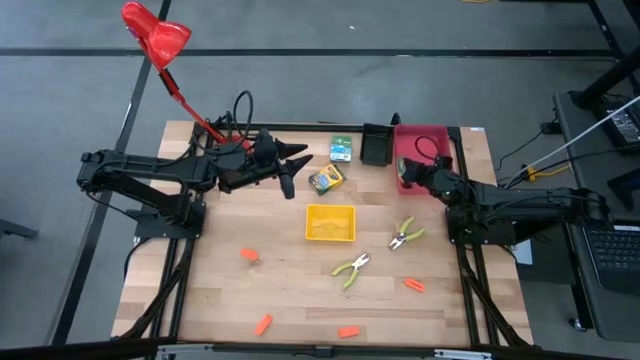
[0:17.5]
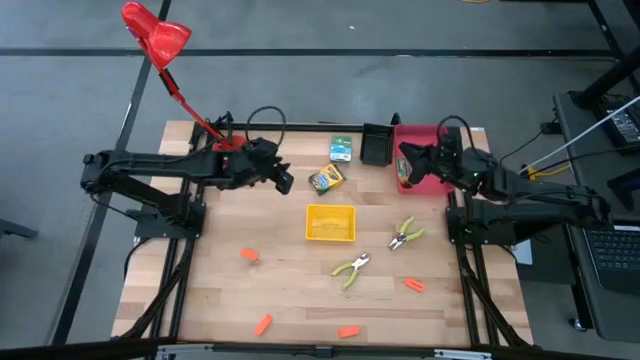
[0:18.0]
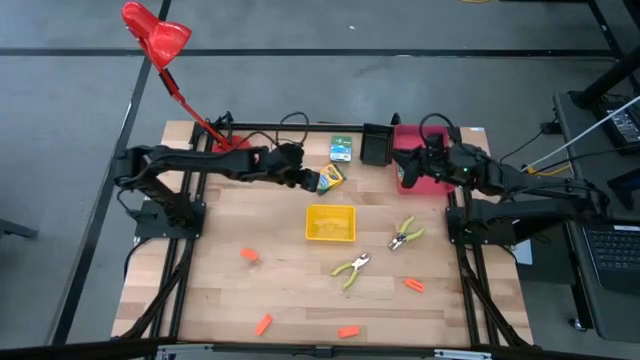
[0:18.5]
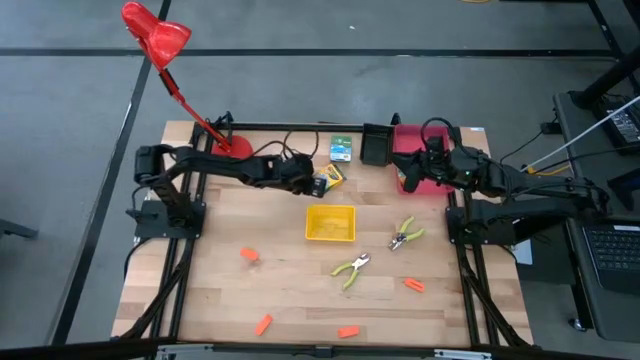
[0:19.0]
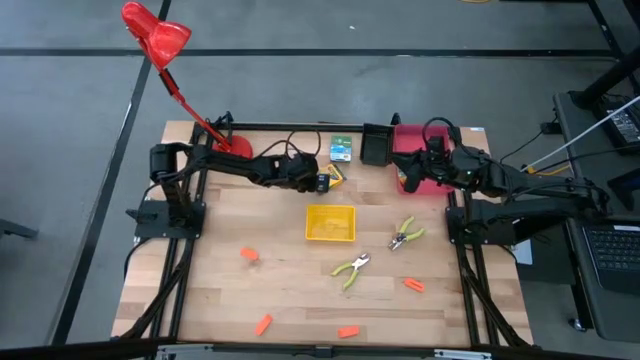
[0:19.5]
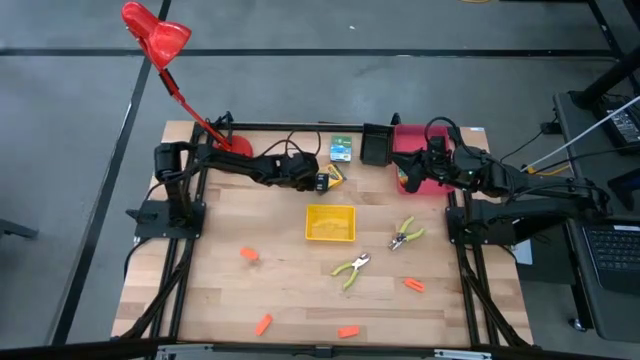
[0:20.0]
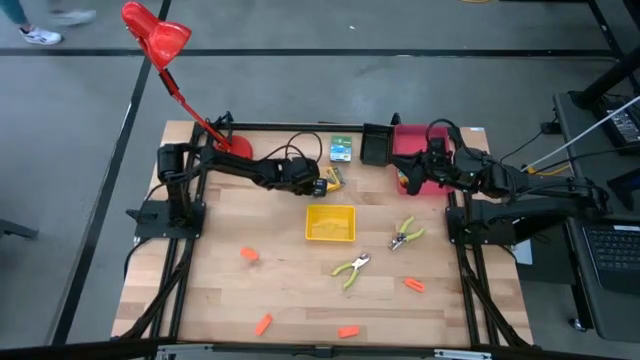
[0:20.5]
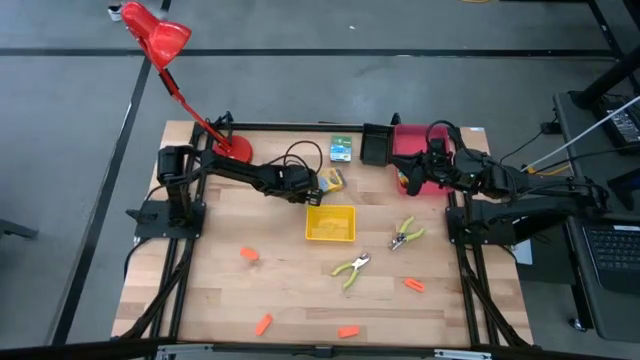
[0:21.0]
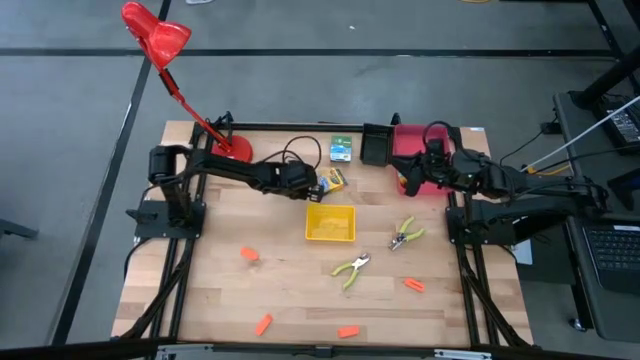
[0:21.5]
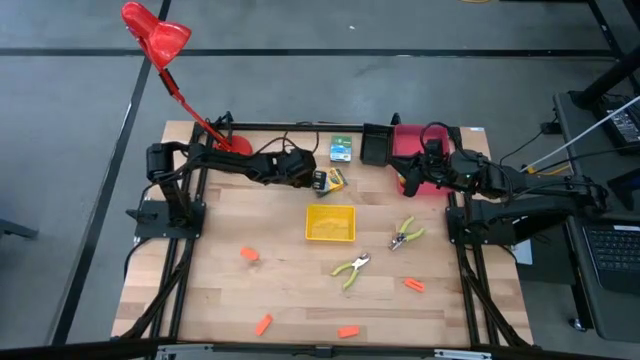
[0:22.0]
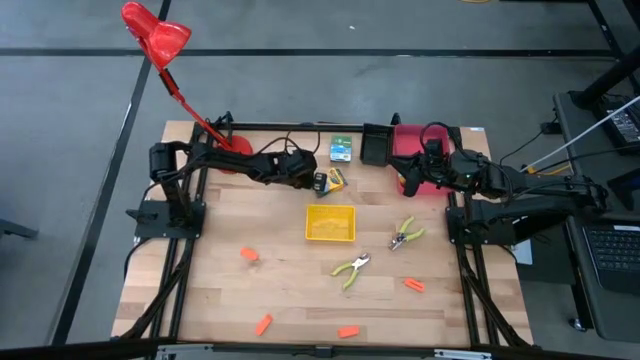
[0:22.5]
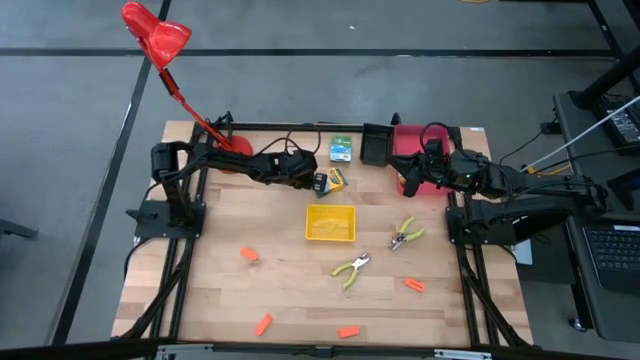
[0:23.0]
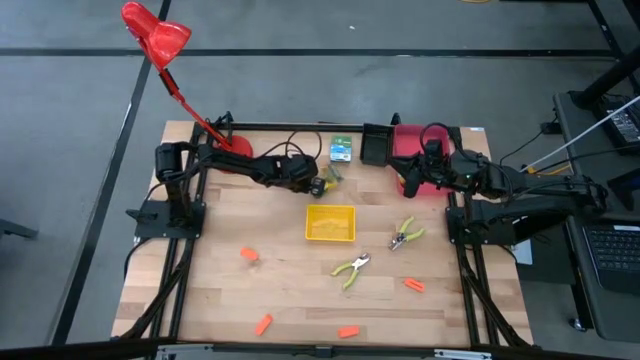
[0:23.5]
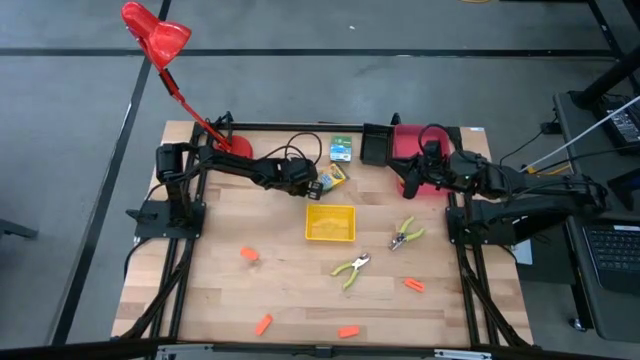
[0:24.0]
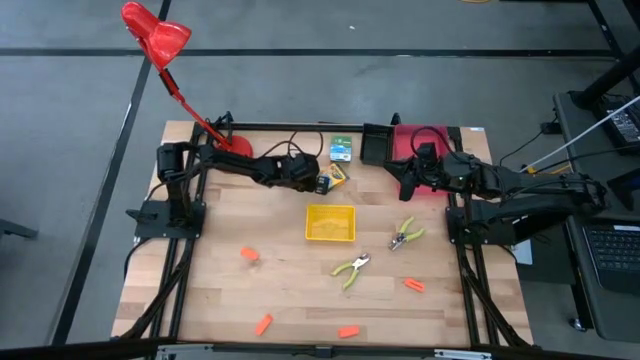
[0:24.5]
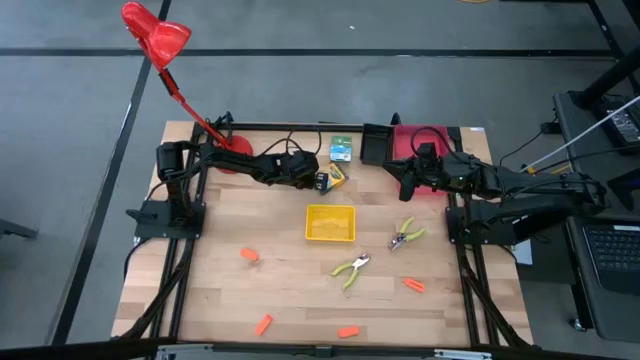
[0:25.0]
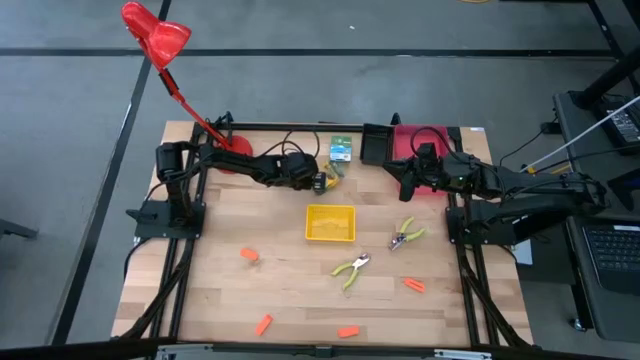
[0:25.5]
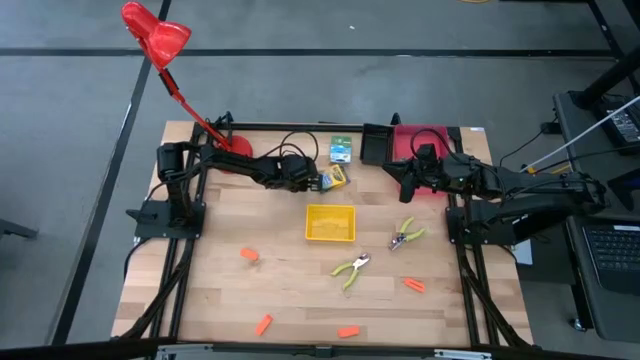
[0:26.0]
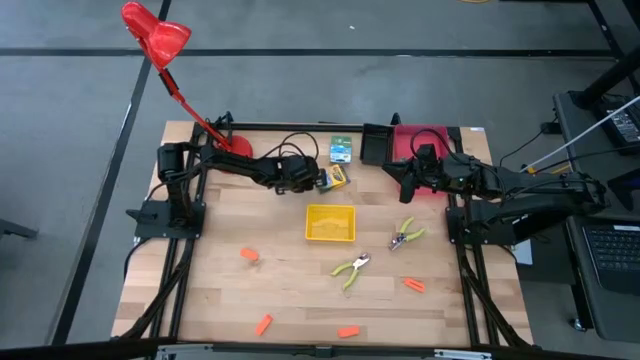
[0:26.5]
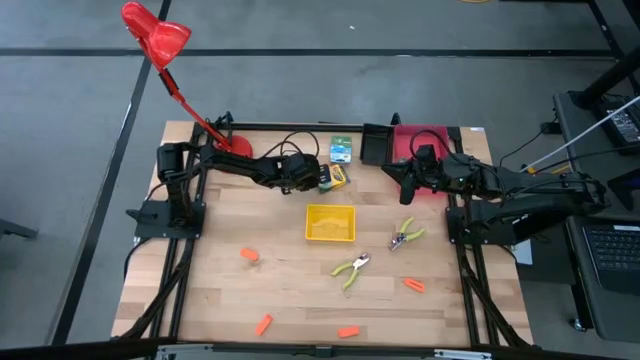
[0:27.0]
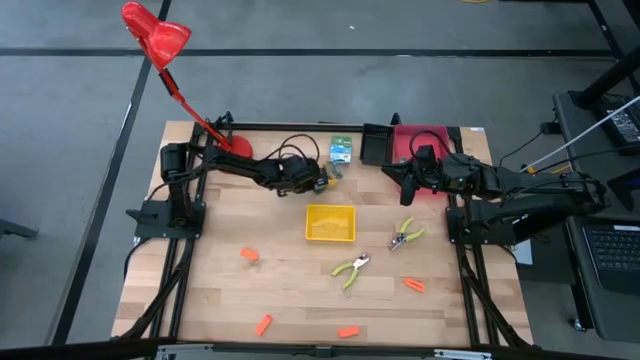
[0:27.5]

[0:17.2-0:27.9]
Task: Pick & Place School Supplies
Put the bottom yellow crayon box into the red bin

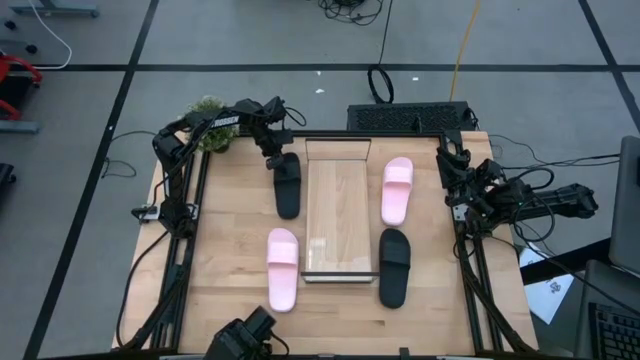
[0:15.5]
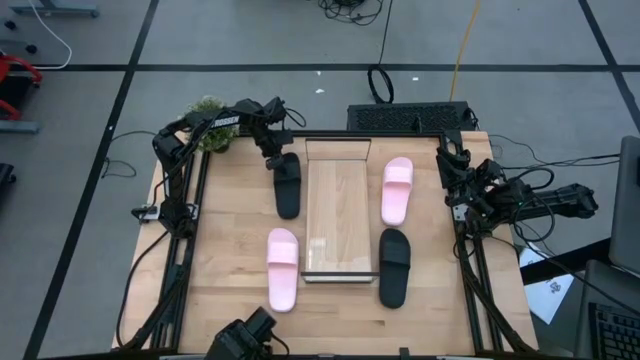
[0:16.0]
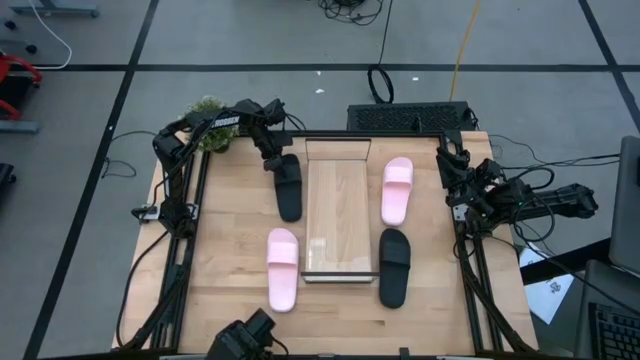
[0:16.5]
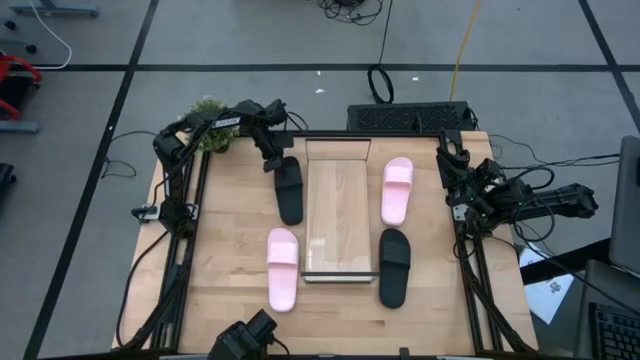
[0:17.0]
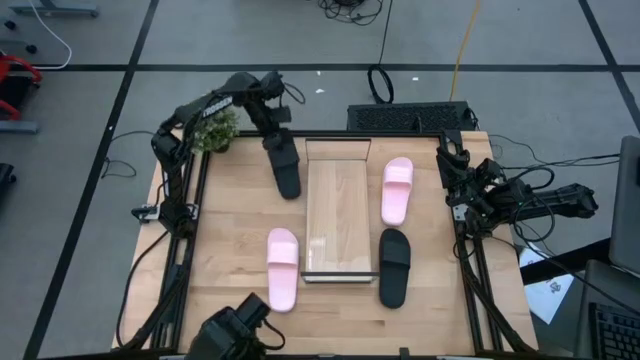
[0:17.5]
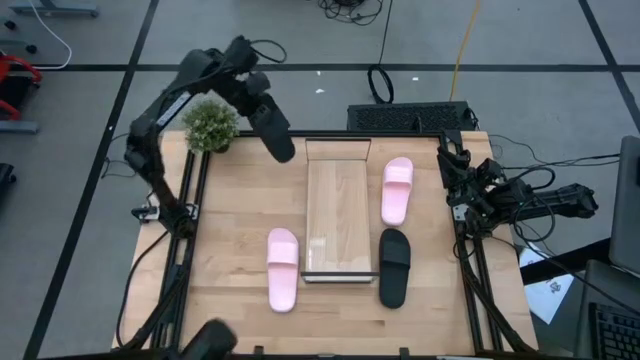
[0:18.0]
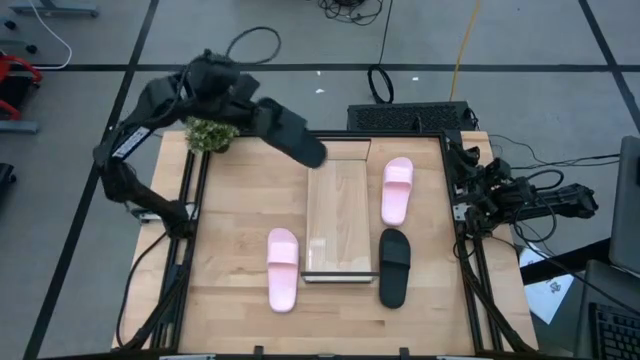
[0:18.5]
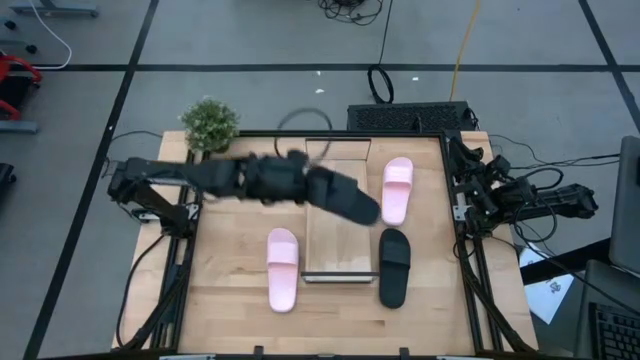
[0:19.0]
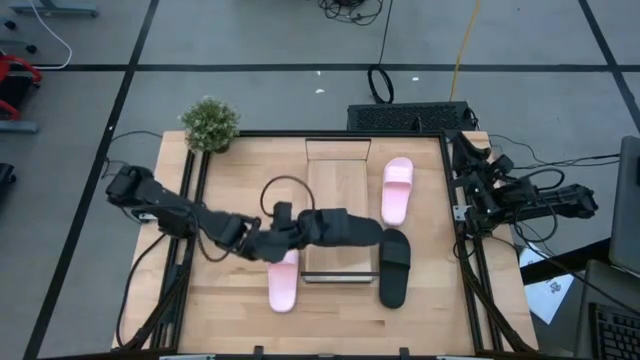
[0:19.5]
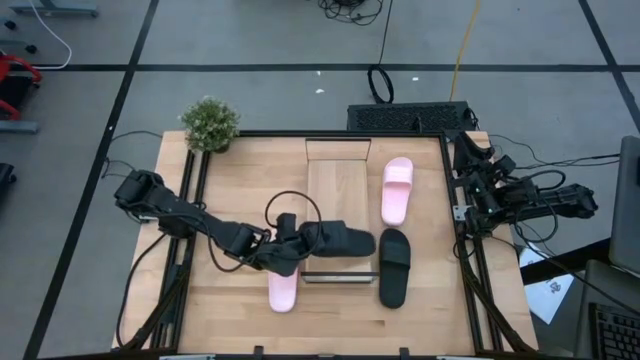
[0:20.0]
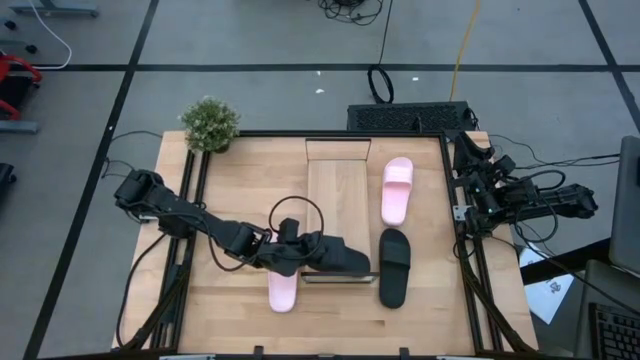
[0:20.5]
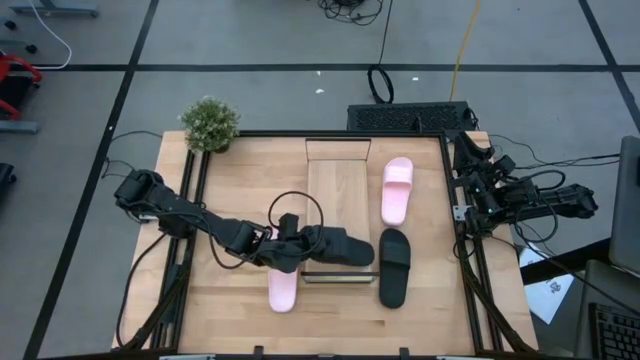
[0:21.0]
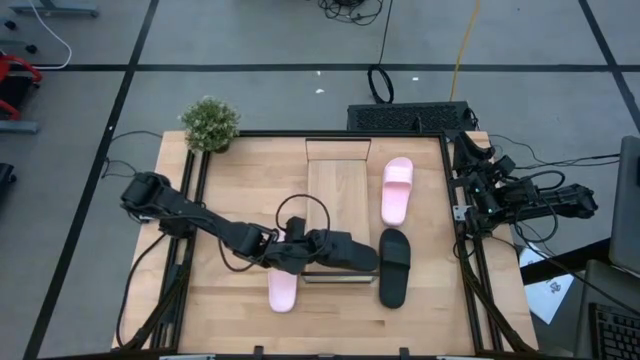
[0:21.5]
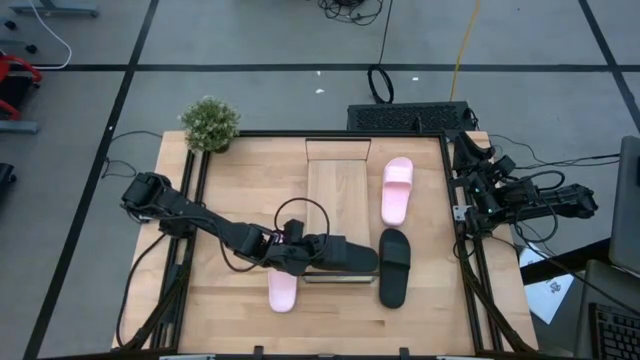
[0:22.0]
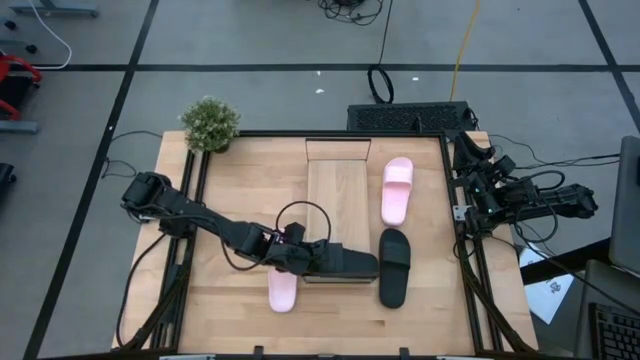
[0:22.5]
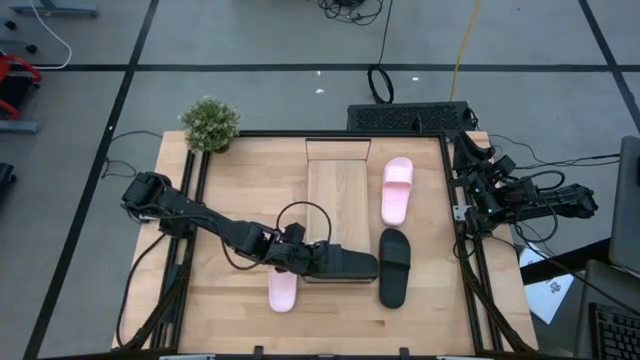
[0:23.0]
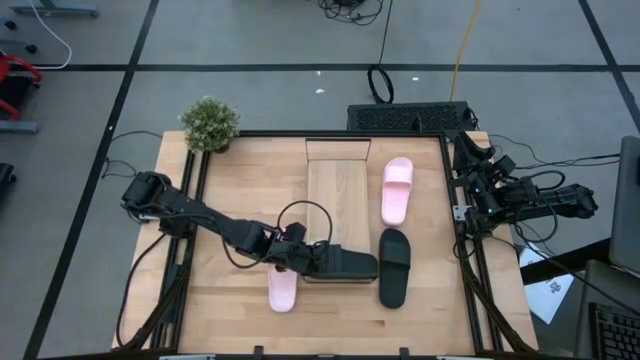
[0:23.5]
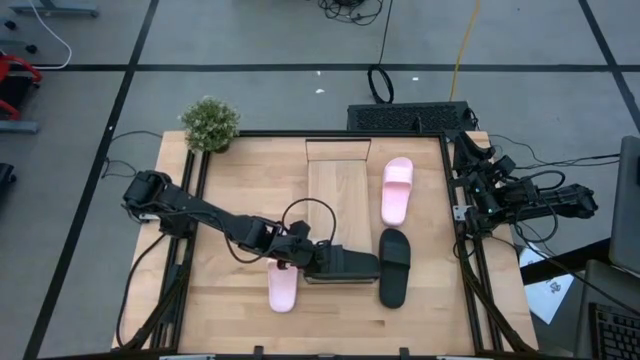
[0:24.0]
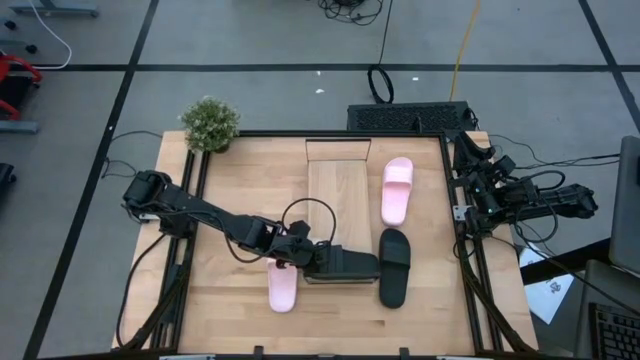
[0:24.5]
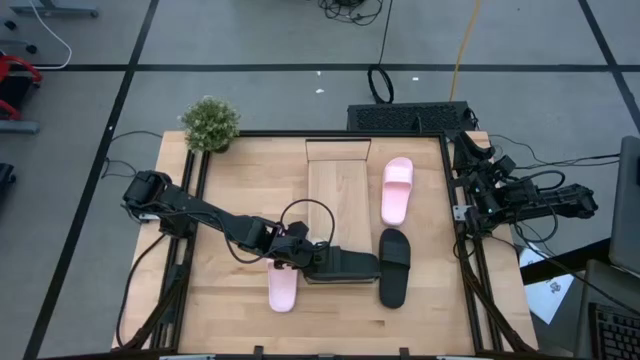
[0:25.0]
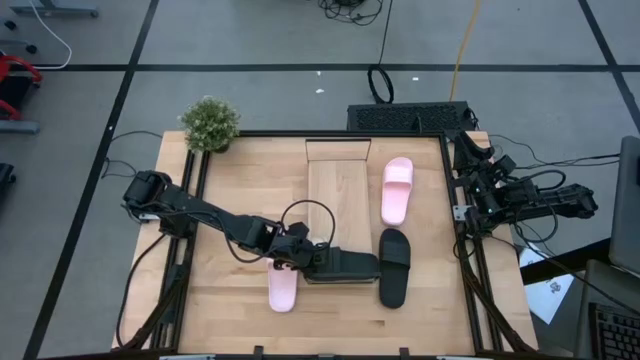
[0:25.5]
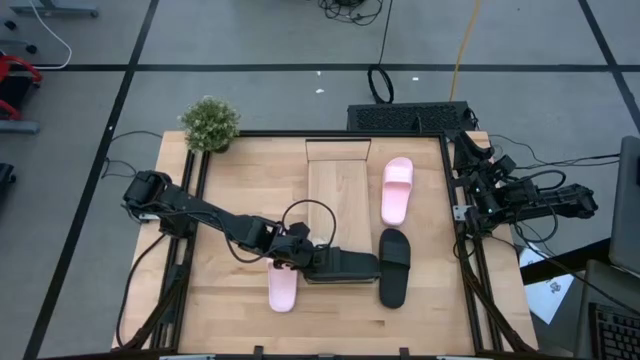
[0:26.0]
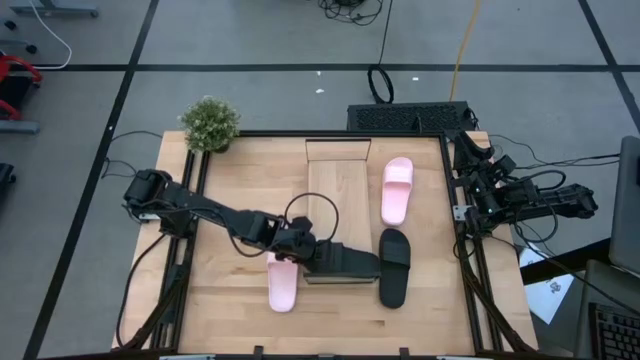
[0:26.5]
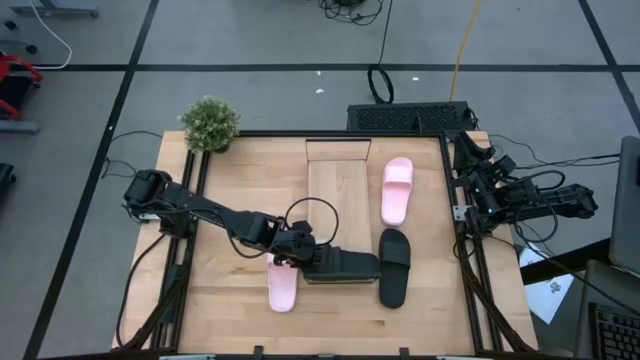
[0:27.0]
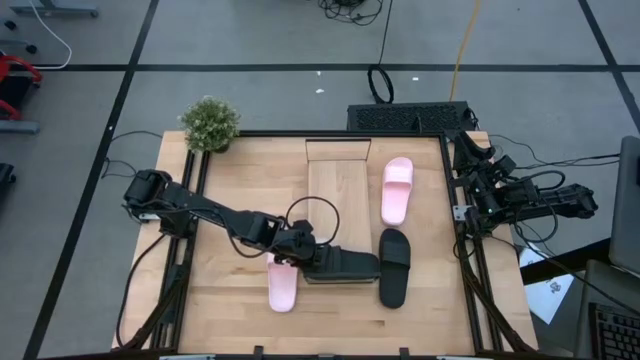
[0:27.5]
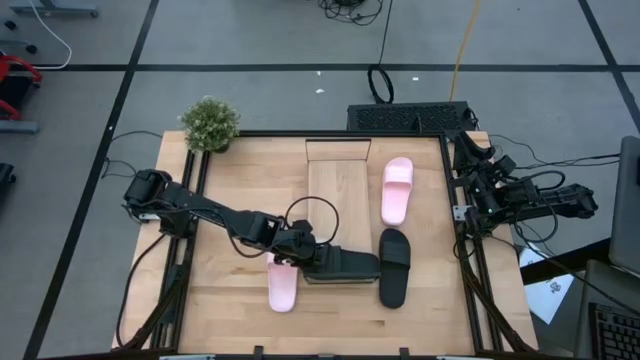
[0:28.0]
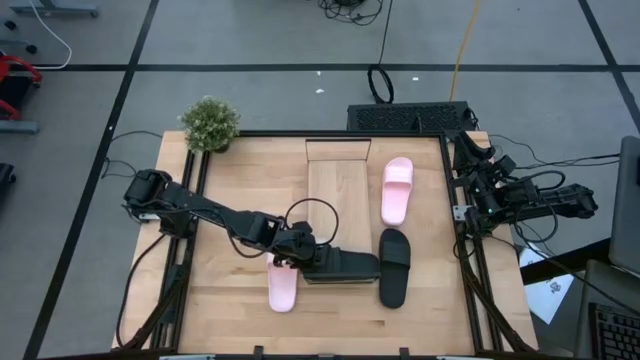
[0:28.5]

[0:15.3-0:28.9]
Task: Pick and place slides into the shelf
Put the top black slipper on the shelf
